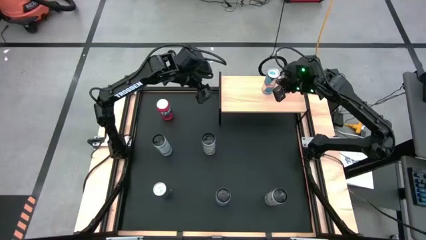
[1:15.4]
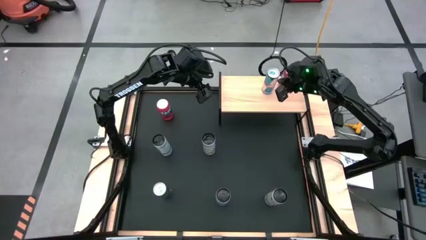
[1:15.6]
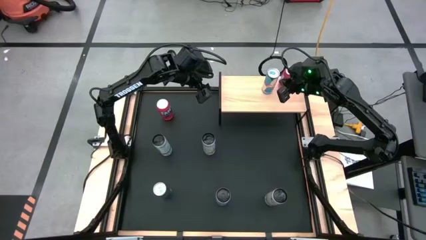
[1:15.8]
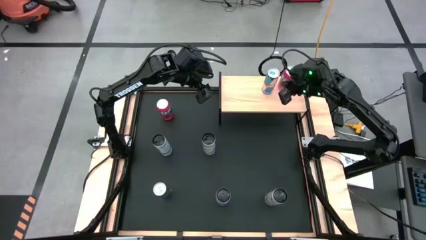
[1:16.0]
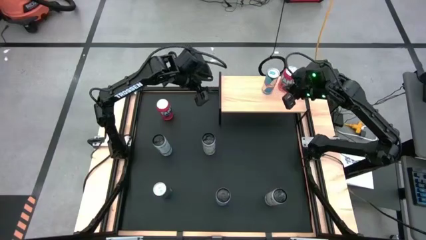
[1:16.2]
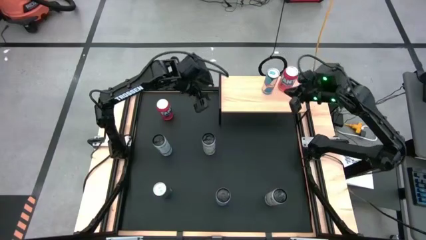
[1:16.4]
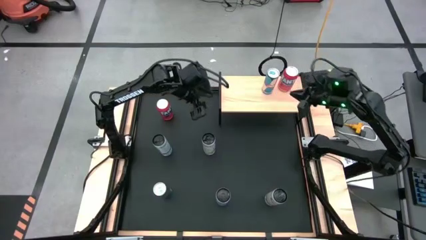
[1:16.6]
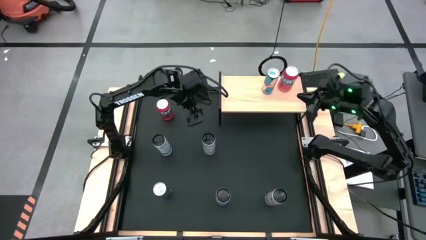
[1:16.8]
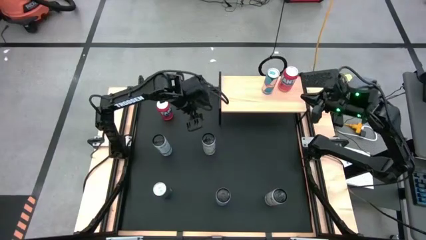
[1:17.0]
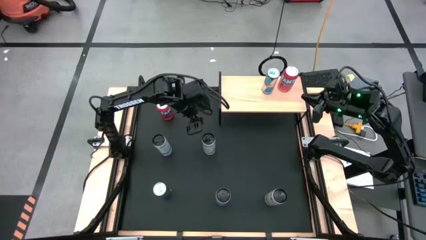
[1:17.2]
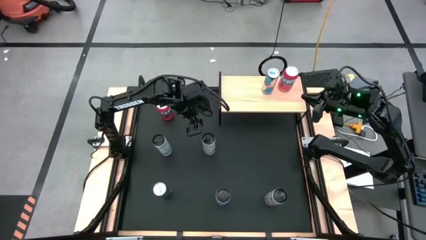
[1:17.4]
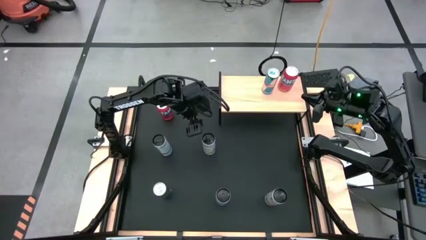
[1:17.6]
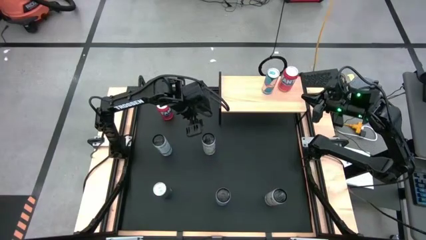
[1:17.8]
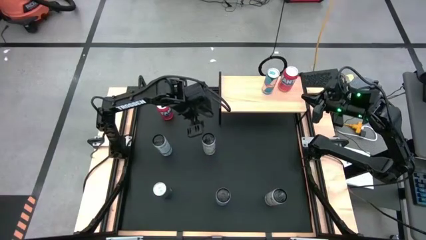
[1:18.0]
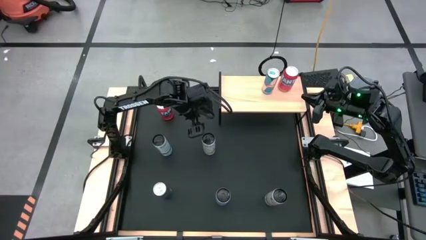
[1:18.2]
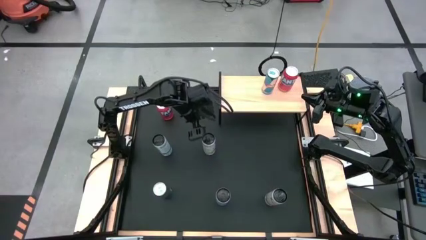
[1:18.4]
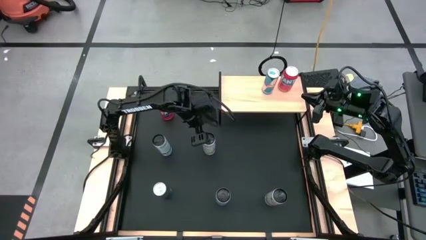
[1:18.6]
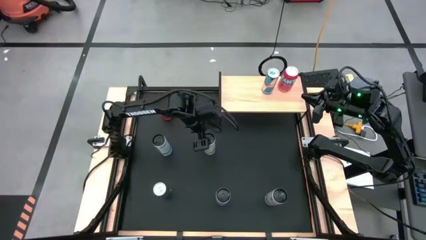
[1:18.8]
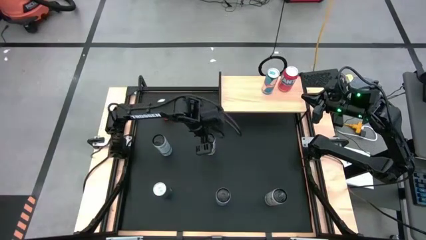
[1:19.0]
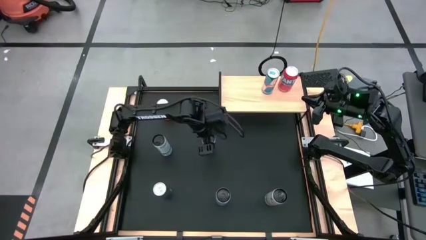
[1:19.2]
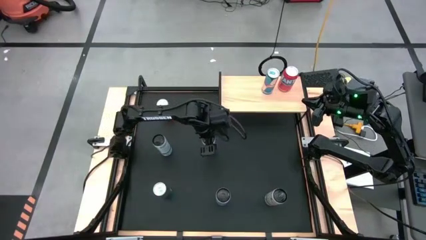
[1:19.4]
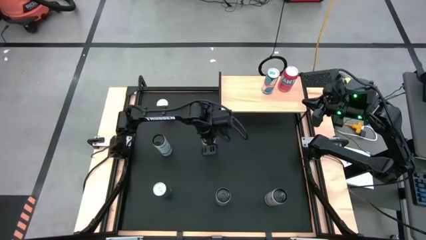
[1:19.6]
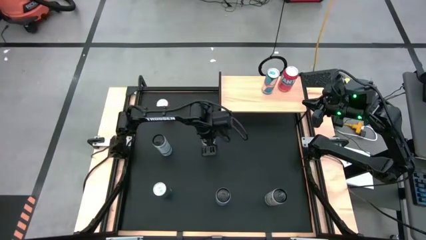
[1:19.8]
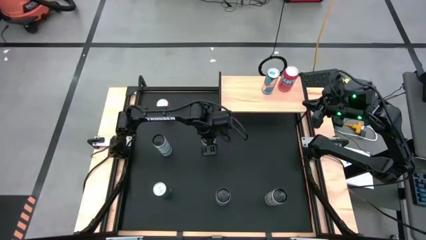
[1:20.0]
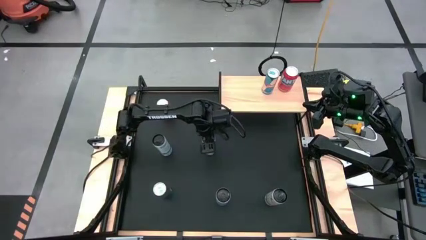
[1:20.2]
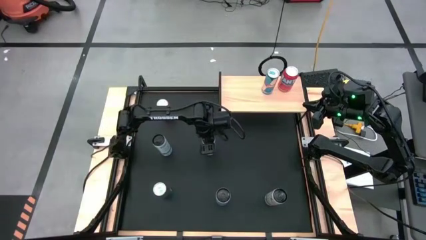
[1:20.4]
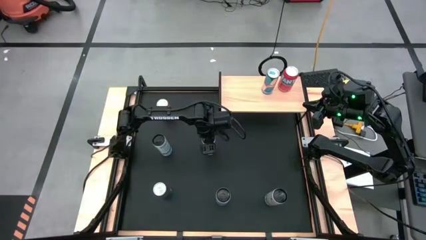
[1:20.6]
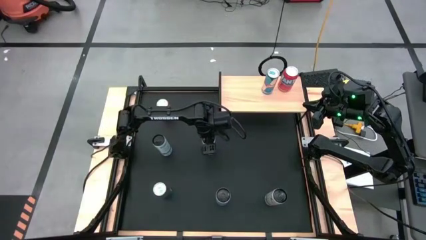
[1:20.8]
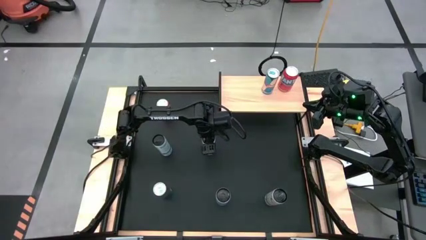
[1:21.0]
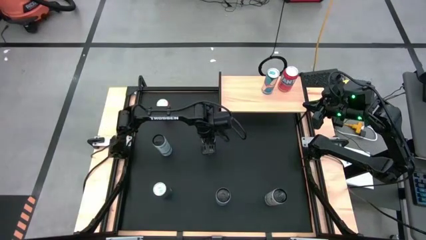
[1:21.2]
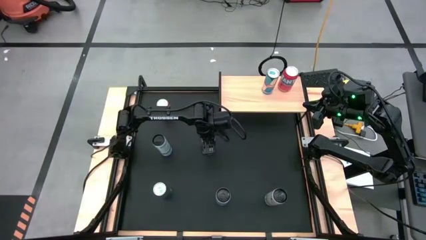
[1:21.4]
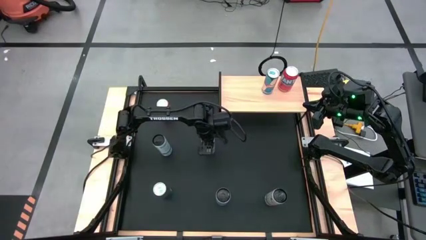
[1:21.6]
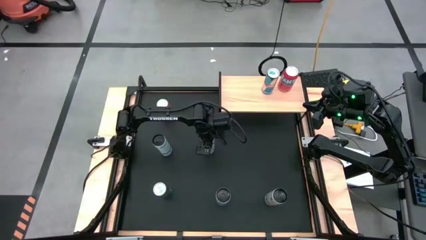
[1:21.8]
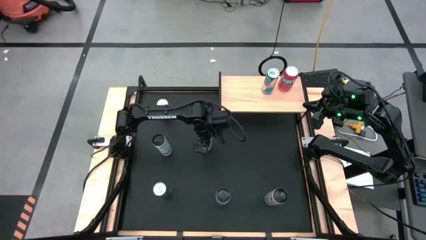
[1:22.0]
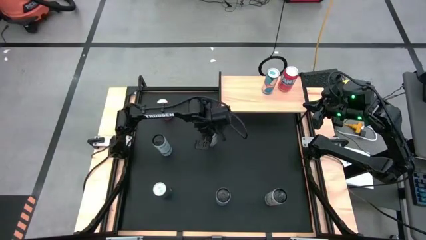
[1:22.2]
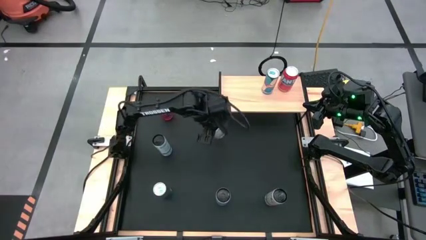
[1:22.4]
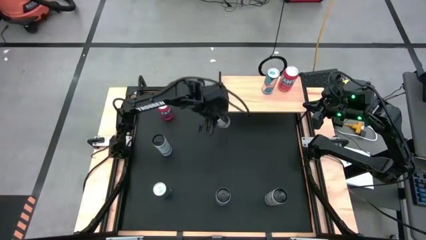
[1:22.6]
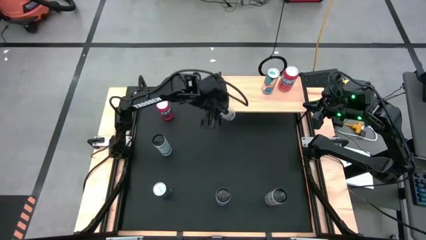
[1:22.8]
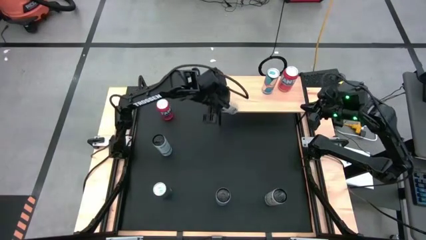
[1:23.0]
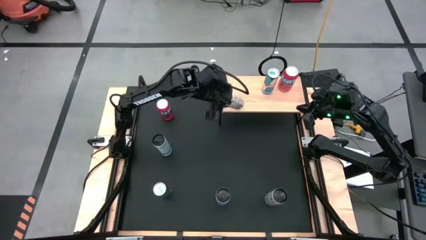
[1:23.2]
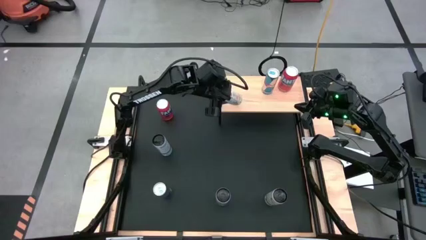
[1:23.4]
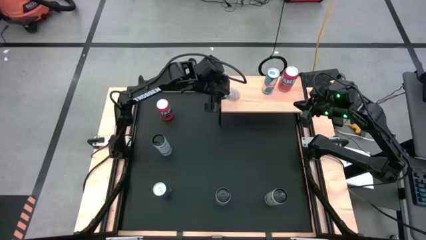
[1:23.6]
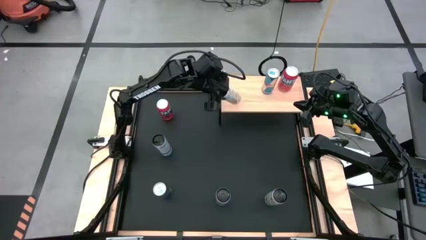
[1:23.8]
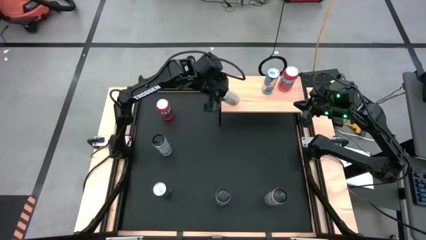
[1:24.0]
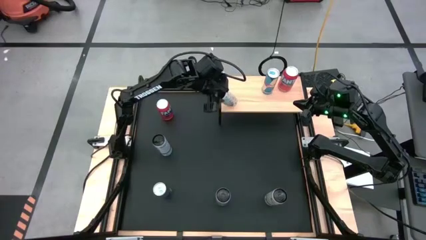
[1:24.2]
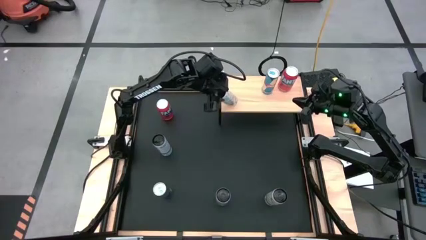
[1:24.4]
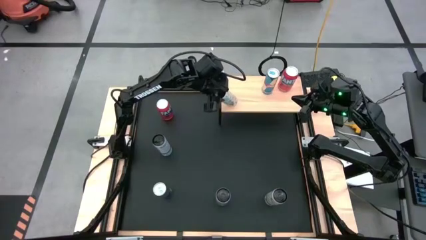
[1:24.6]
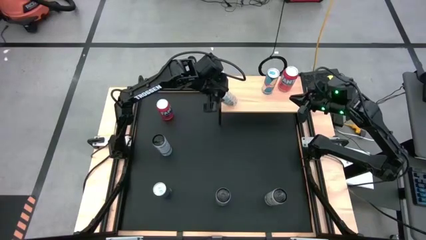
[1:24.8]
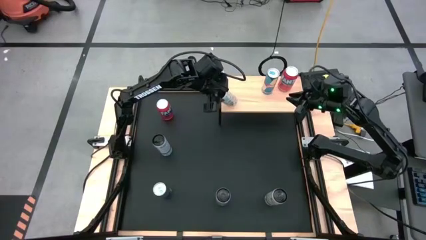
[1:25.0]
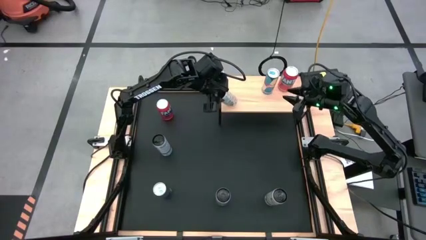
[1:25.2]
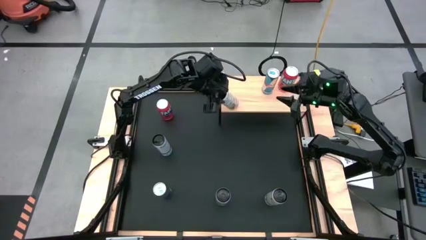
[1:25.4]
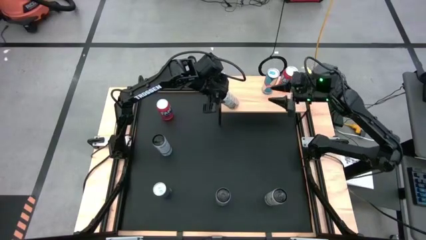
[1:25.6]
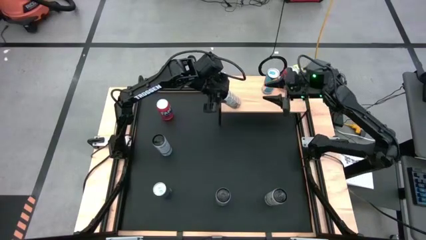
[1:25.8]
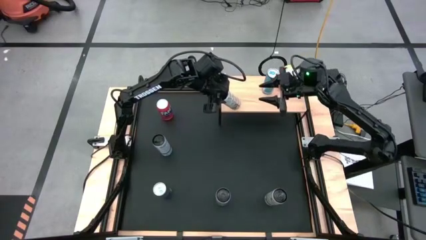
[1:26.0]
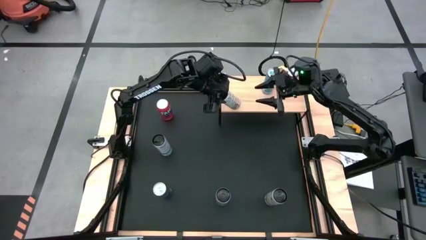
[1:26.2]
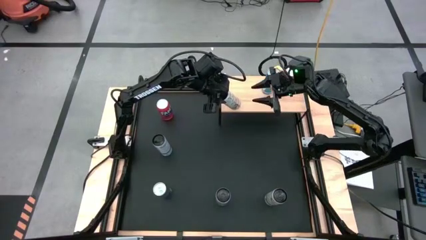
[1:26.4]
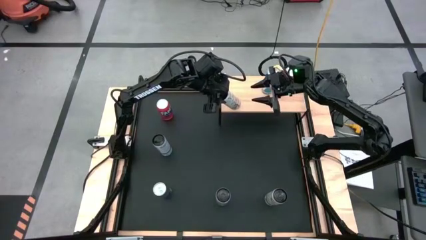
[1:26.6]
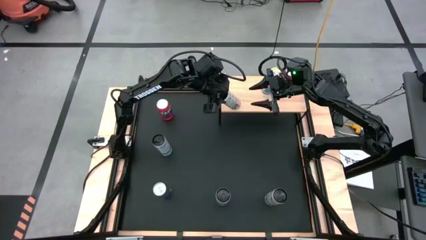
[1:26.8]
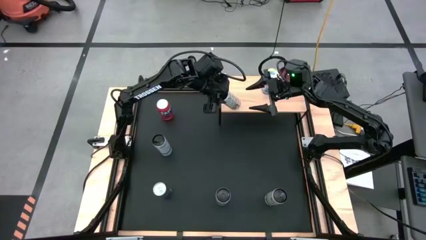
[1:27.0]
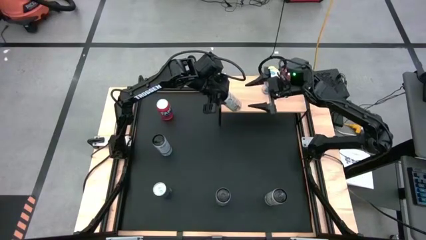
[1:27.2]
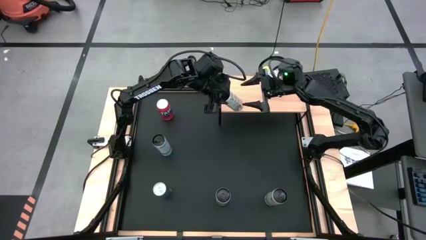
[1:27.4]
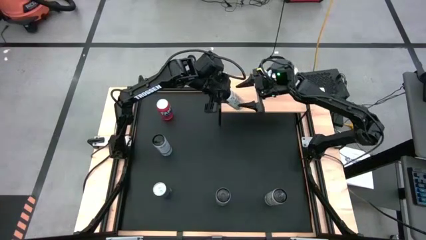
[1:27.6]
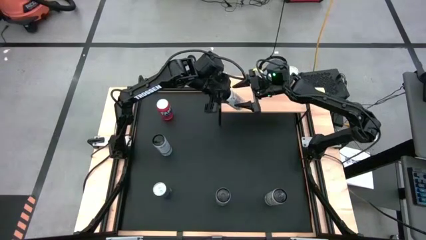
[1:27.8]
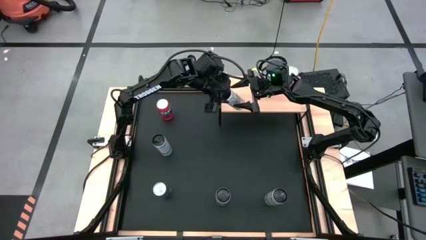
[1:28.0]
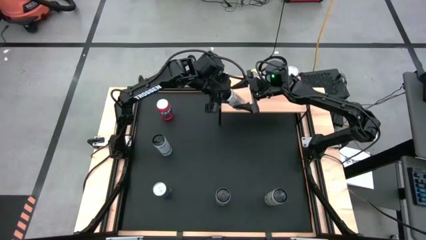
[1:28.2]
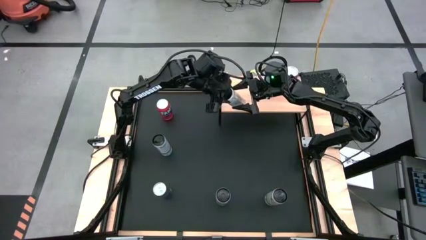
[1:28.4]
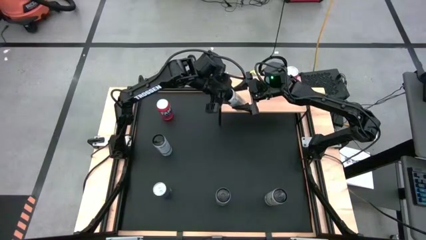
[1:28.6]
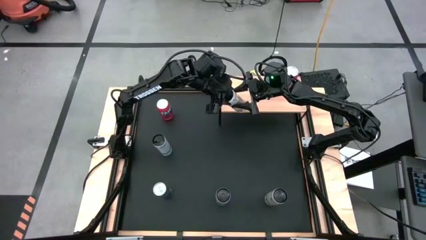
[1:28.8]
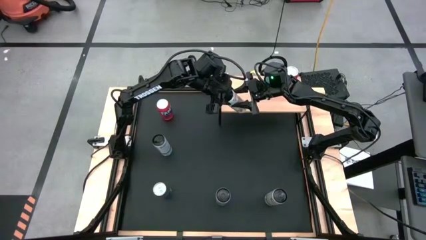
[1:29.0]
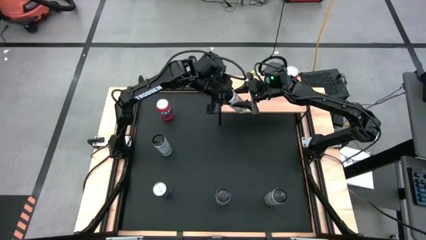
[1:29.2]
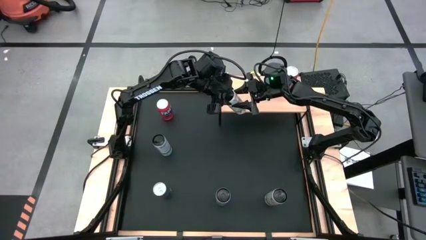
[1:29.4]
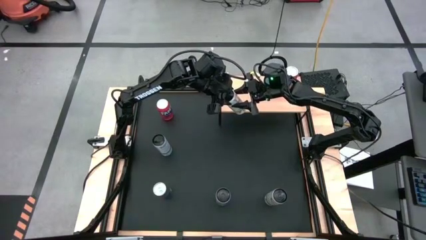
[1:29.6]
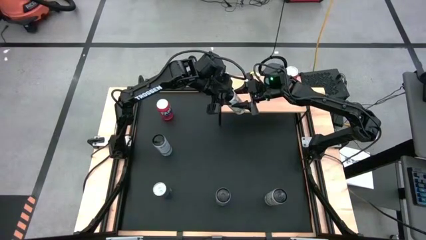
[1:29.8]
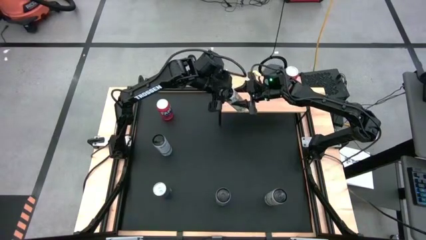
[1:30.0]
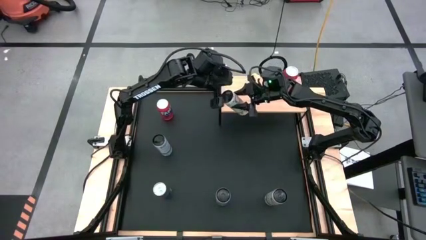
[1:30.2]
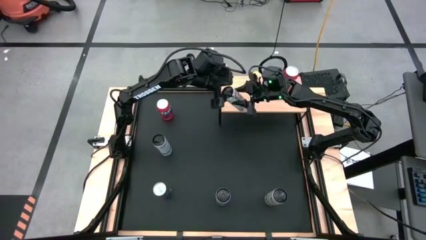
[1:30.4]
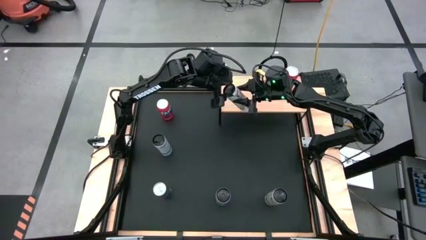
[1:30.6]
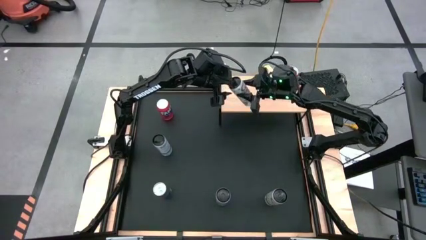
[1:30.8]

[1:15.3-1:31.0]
Task: Place canned beverage on shelf
Put the top white yellow soda can on the shelf
